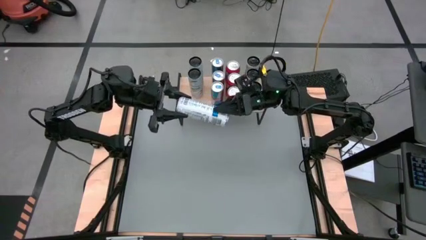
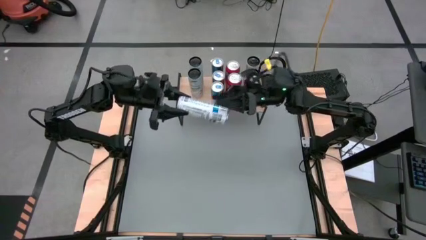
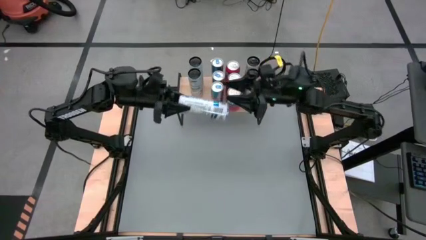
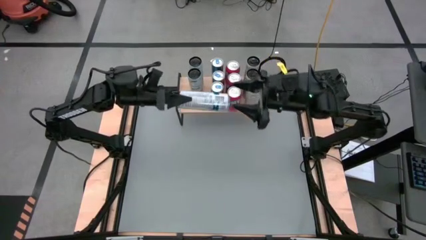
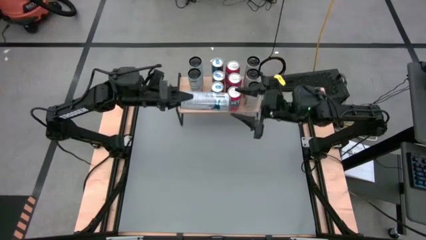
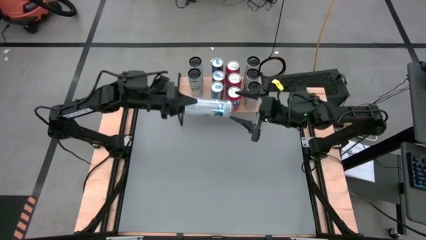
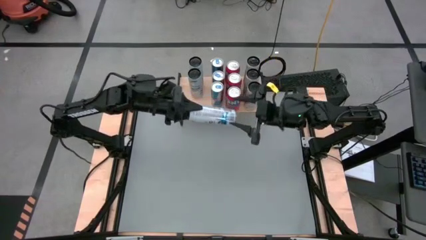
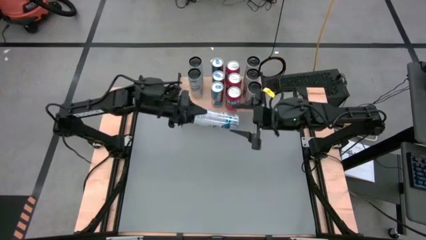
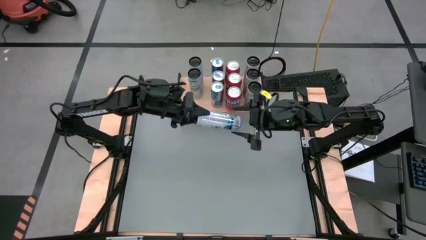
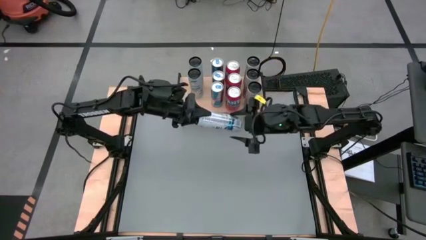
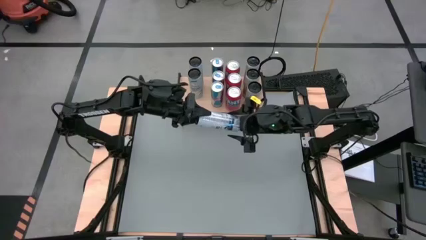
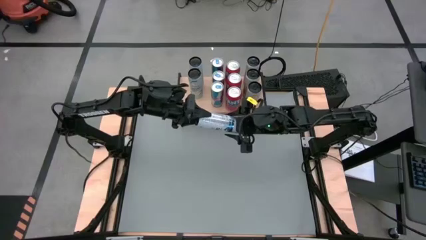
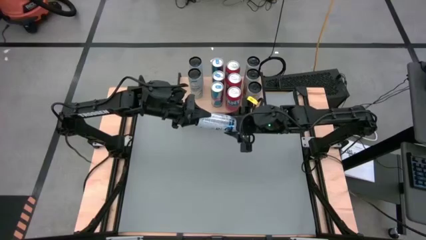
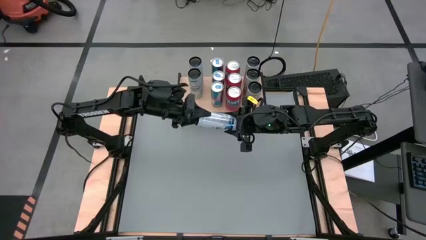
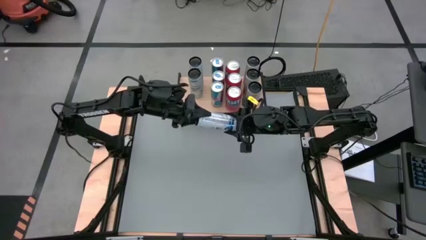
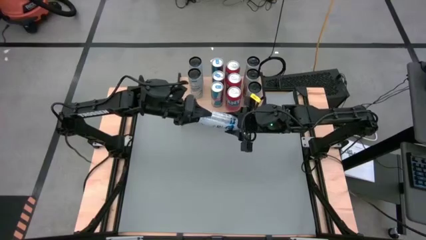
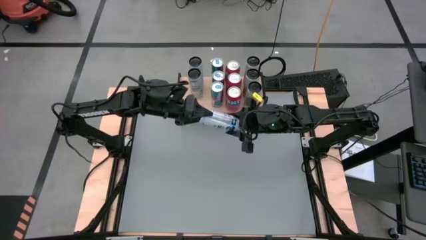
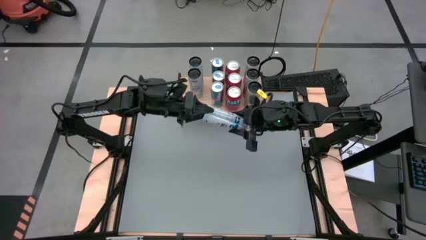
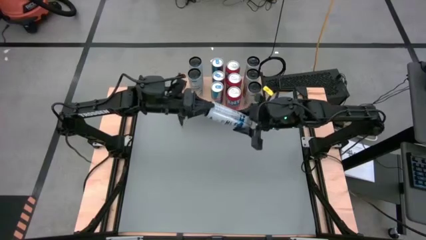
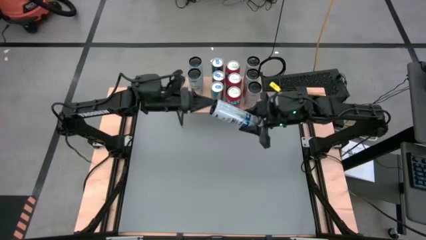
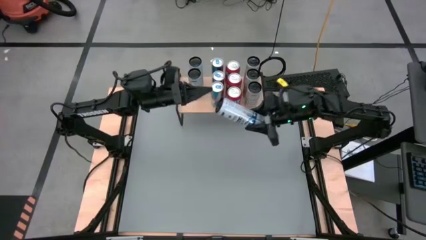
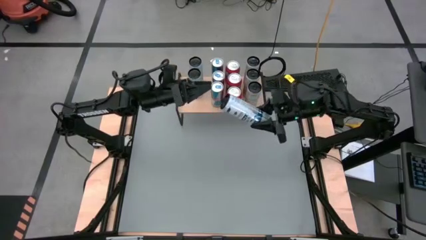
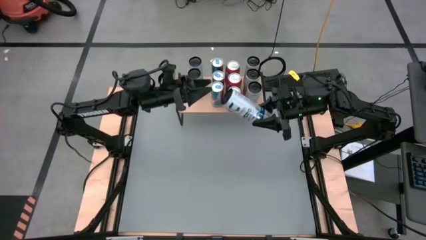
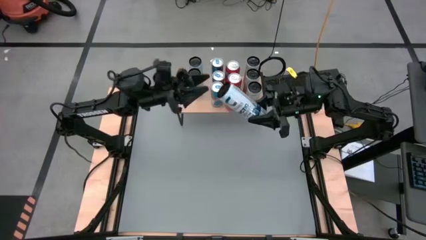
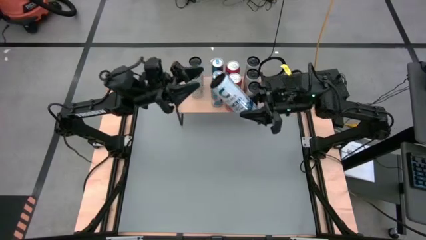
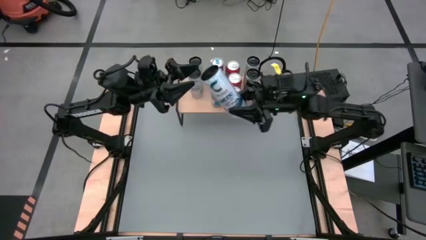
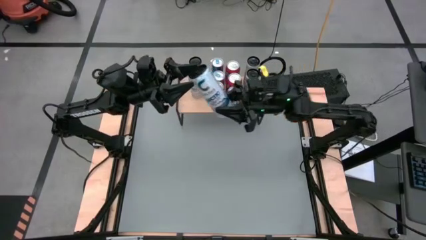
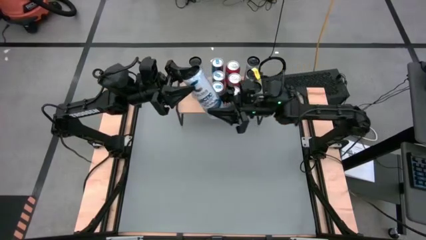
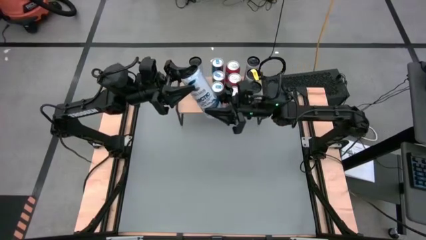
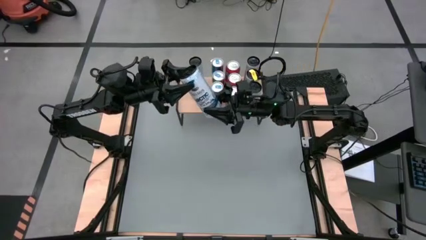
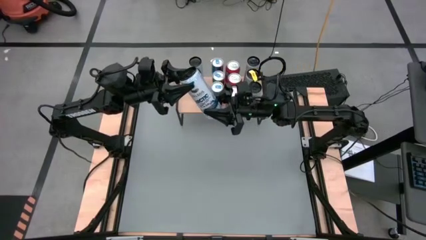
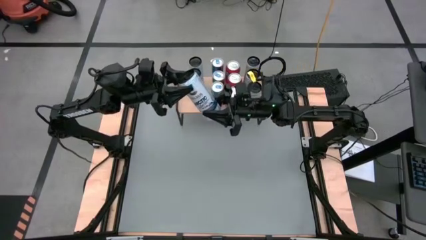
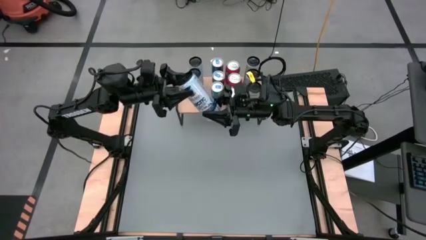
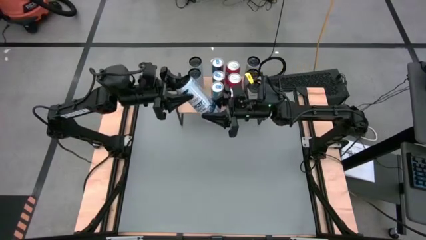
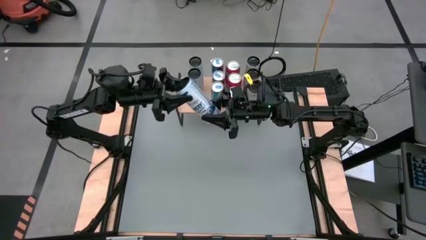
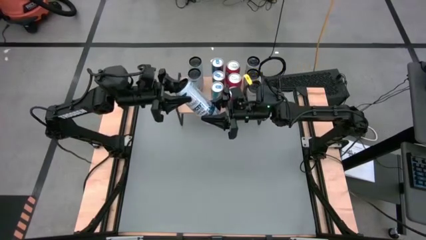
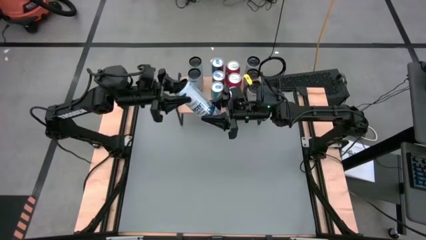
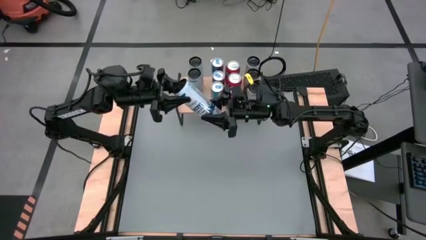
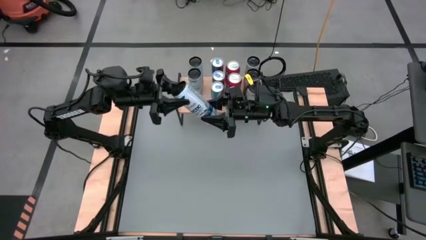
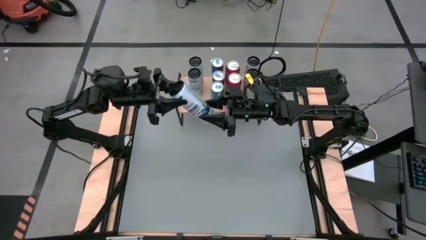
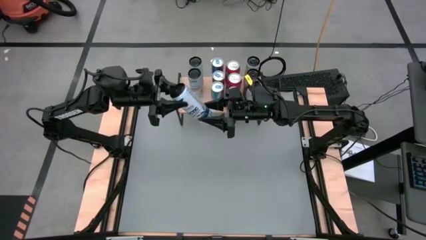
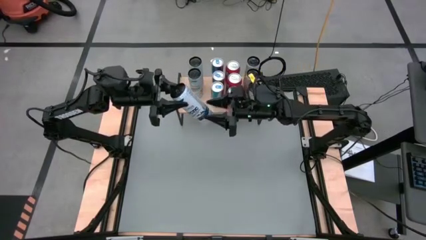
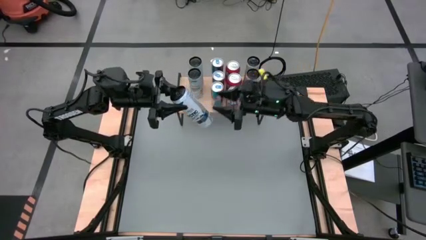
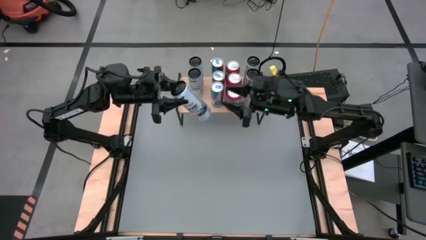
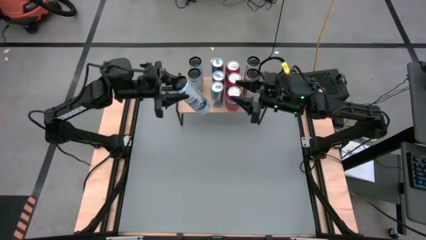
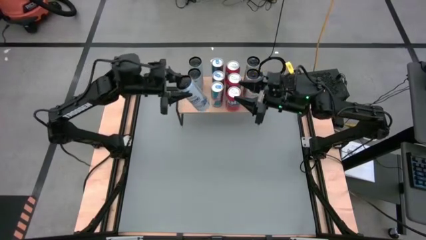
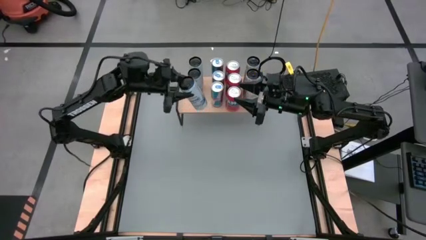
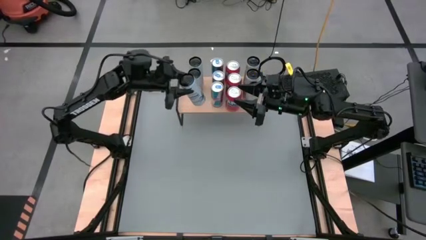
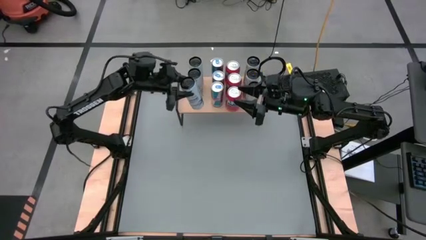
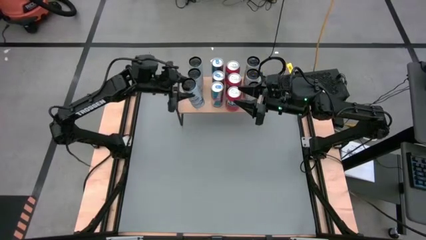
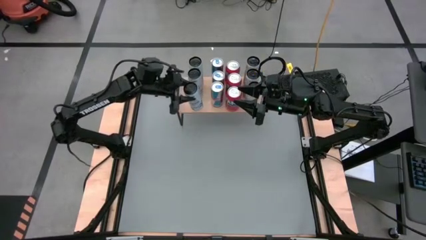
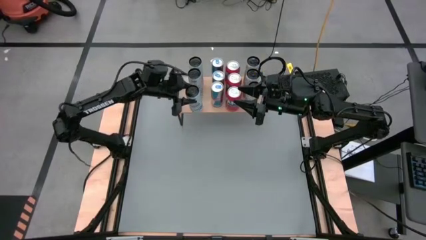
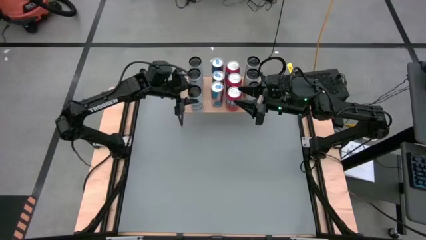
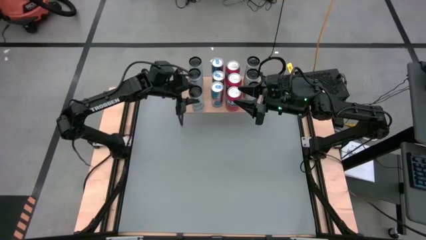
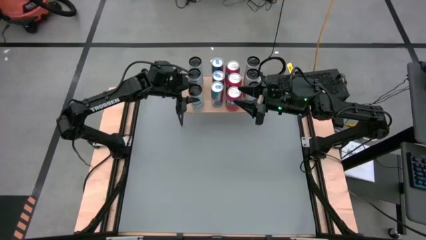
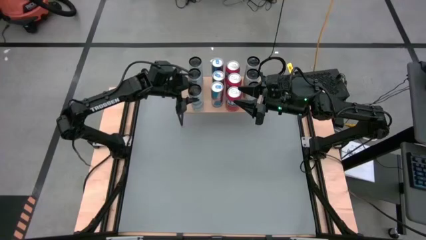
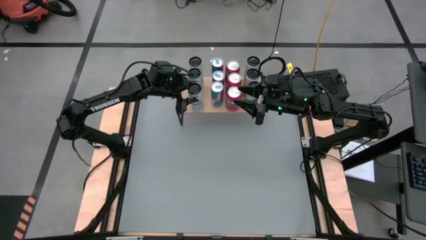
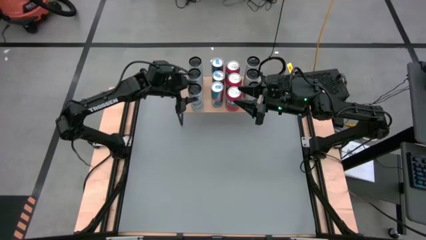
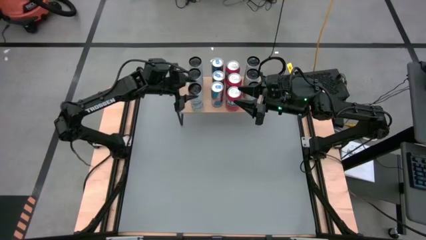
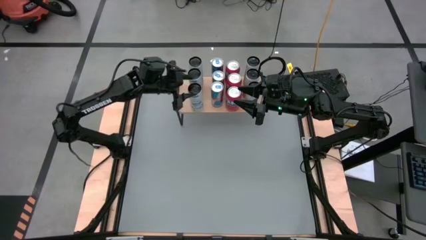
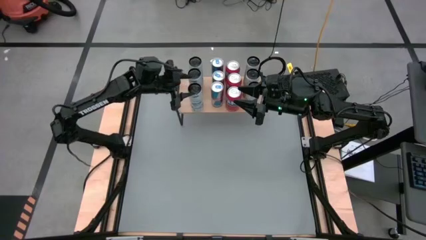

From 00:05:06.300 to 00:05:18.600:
Task: Place canned beverage on shelf
Put the white soda can on the shelf aligned with the other white soda can

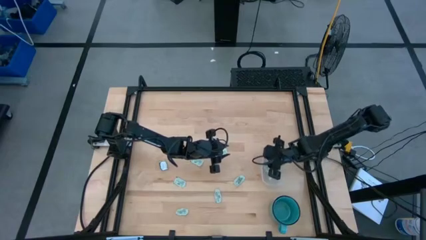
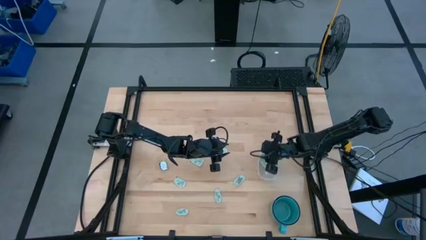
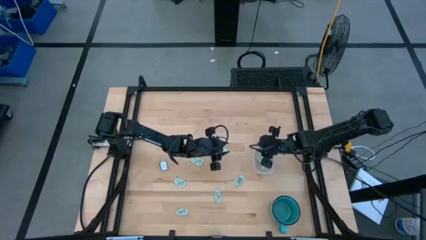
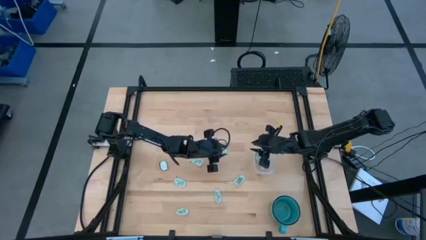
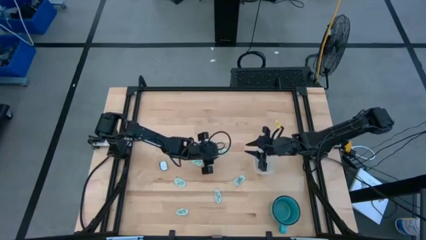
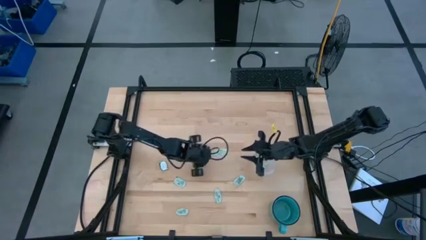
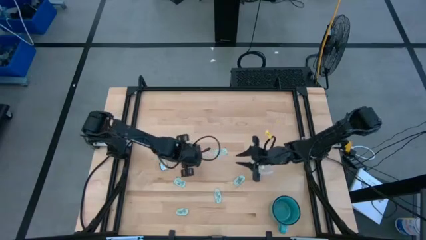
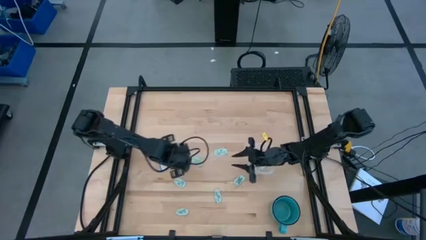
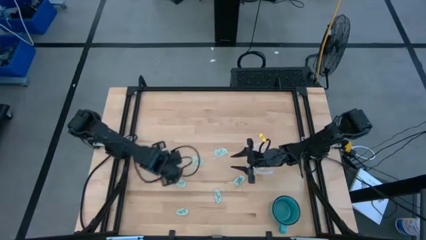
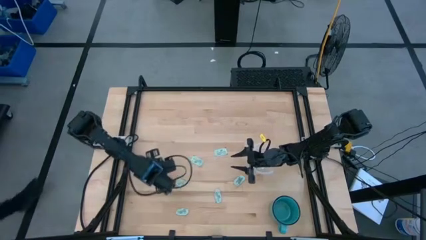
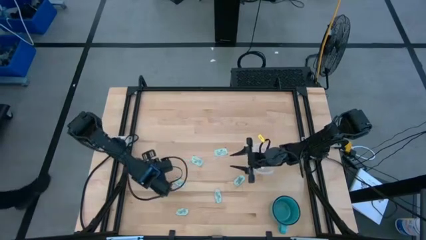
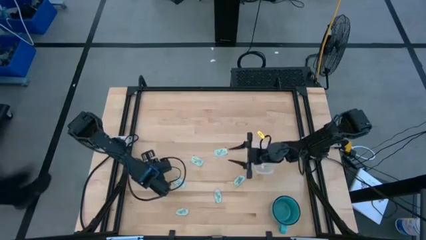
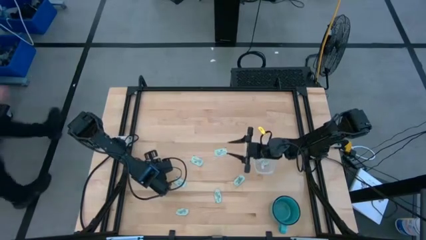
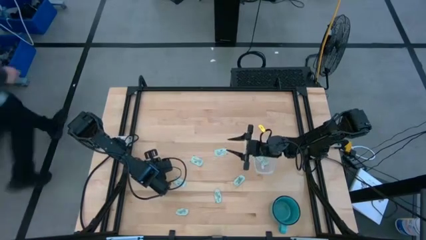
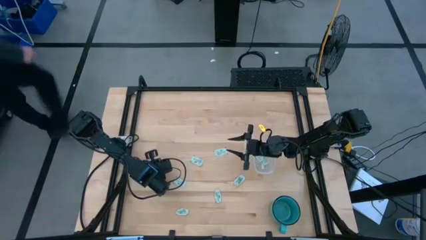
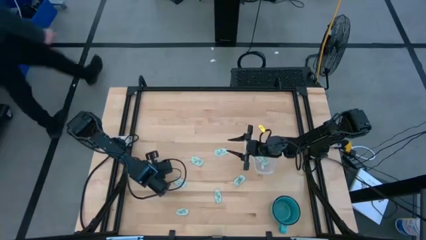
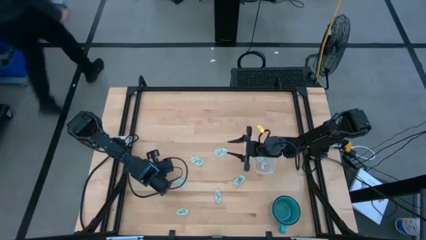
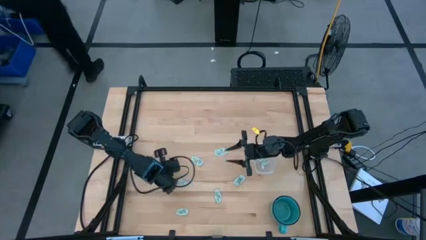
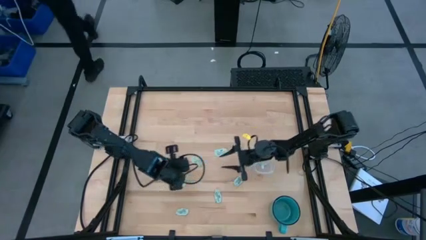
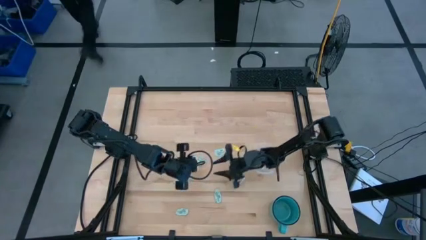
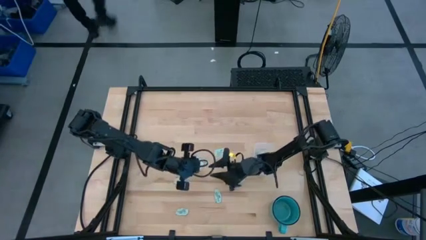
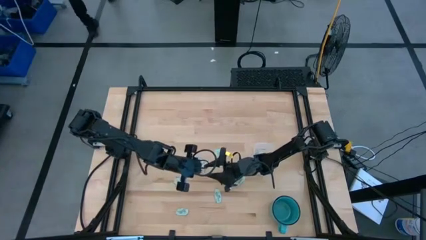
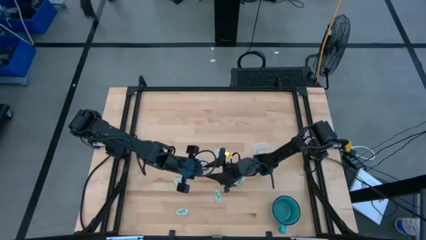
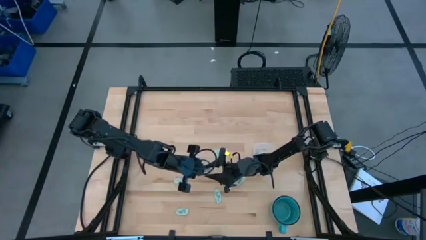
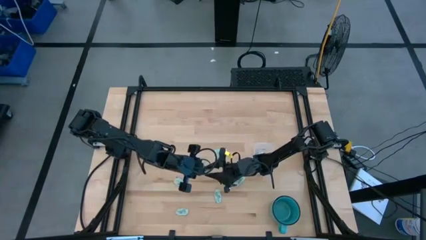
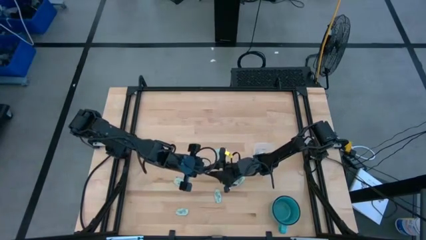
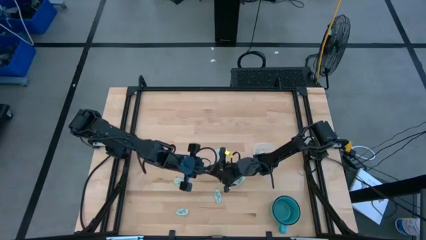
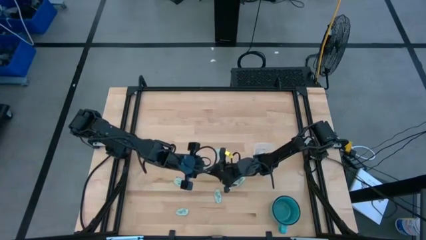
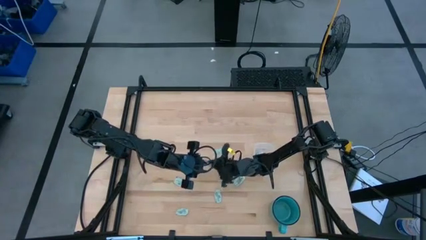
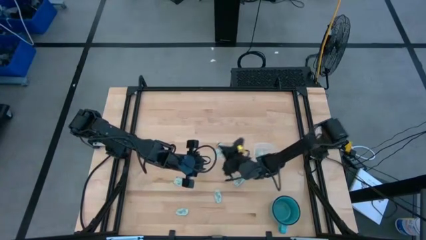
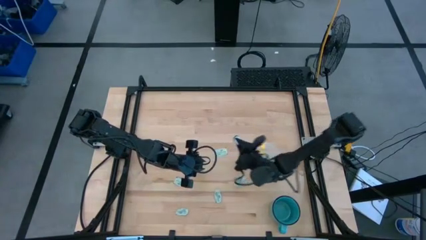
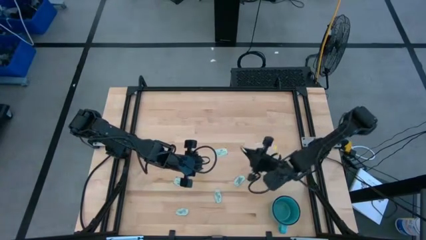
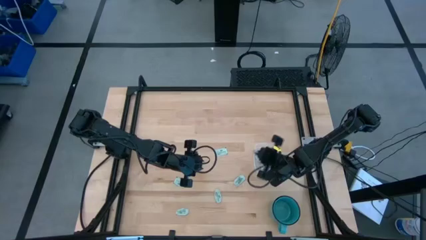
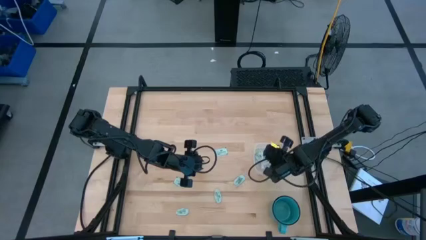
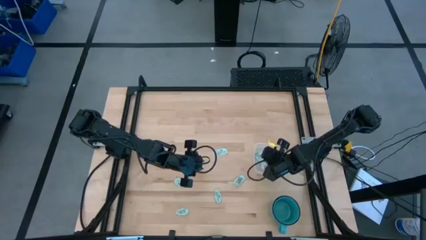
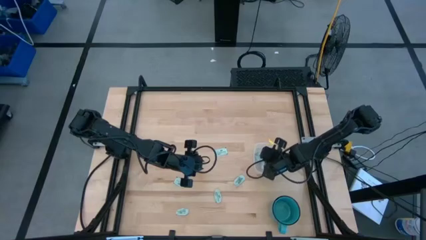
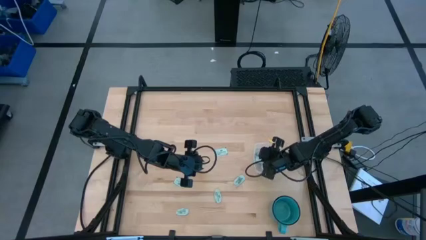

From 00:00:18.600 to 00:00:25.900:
Task: Pick and place Stevia / Truvia into bins
Put the truvia packet into the bin
